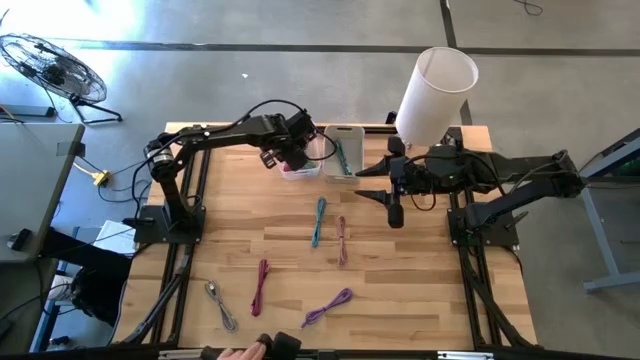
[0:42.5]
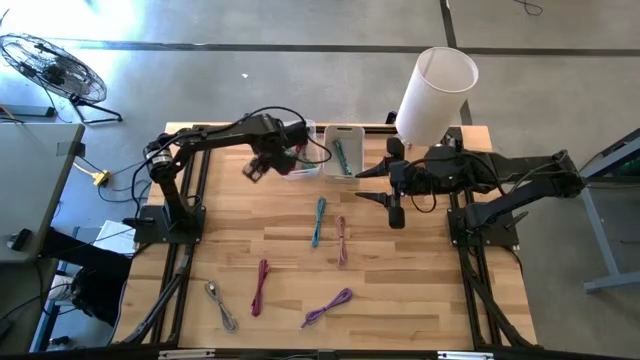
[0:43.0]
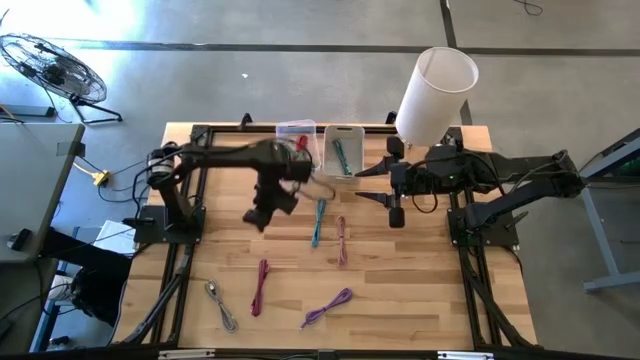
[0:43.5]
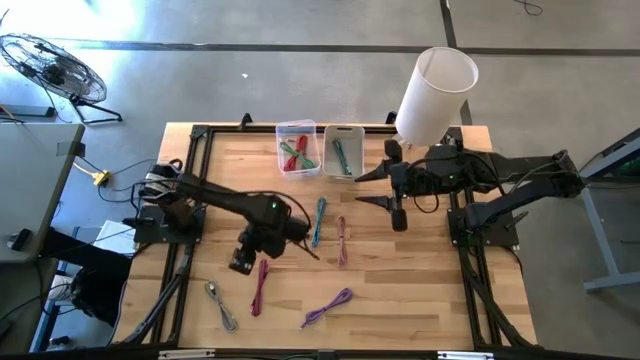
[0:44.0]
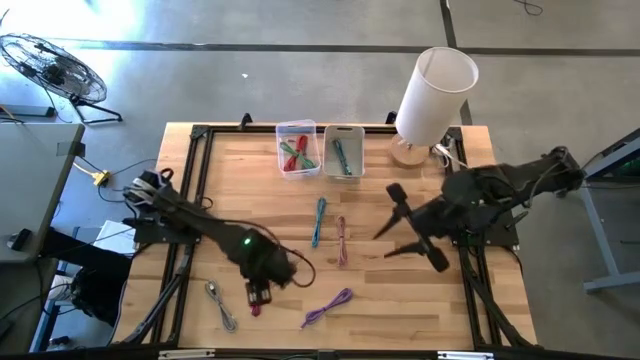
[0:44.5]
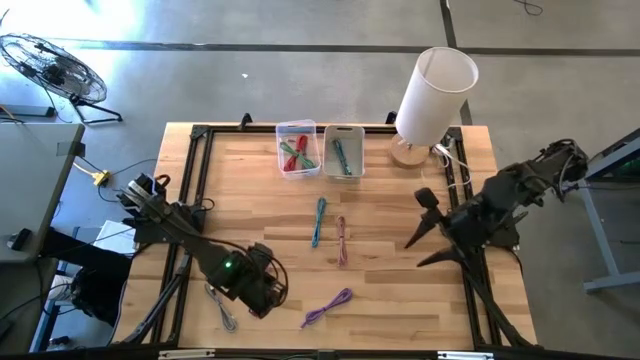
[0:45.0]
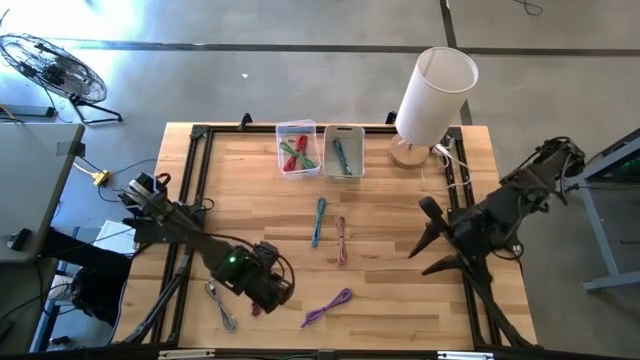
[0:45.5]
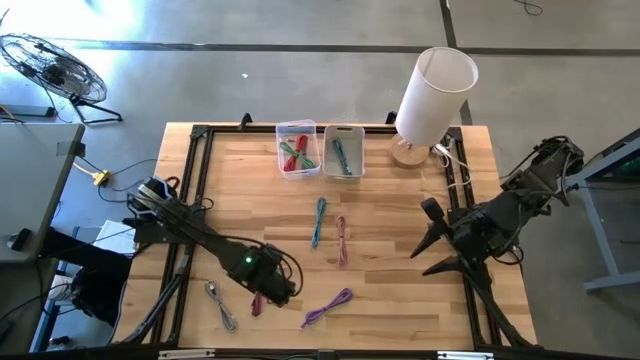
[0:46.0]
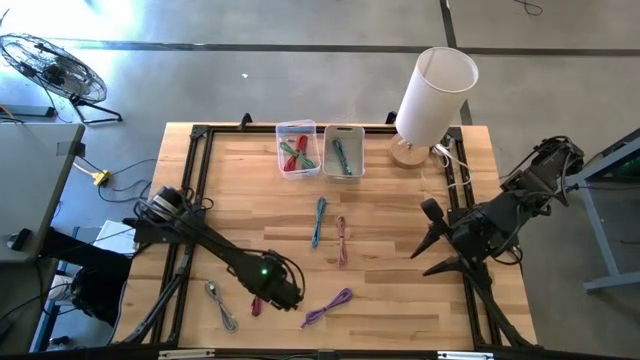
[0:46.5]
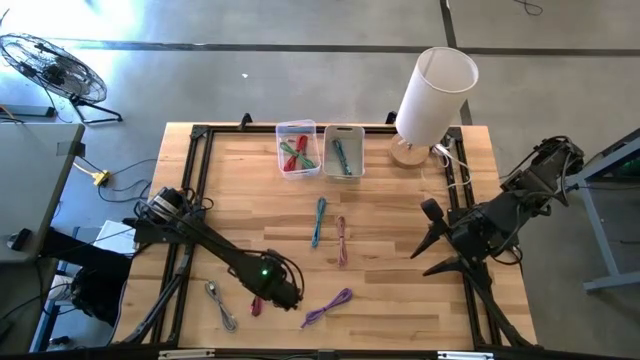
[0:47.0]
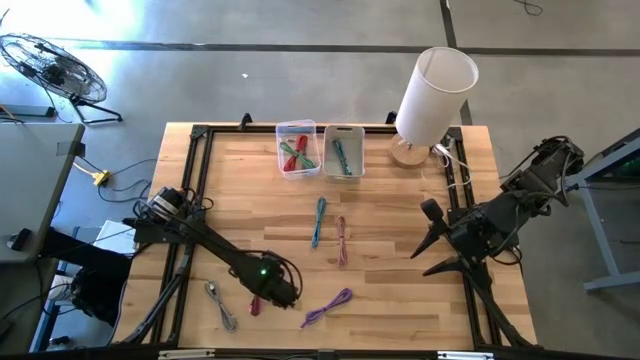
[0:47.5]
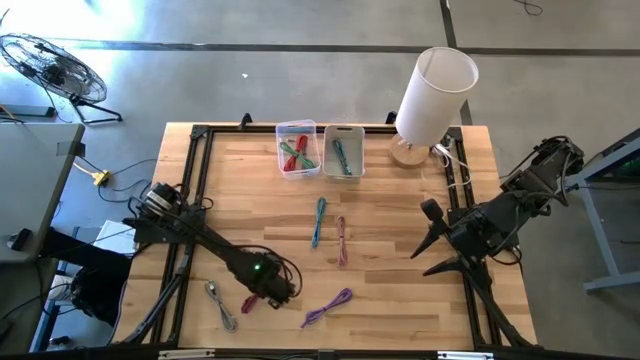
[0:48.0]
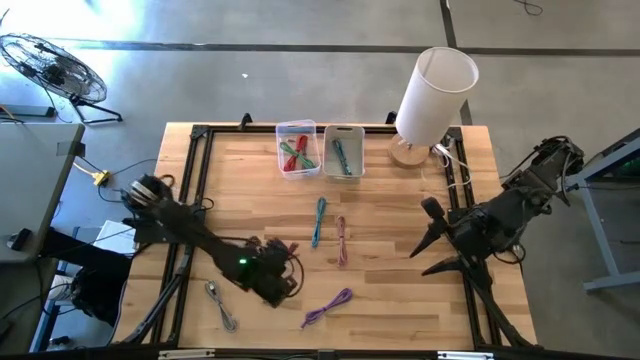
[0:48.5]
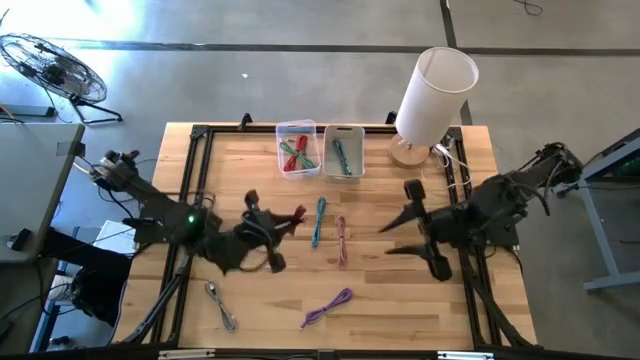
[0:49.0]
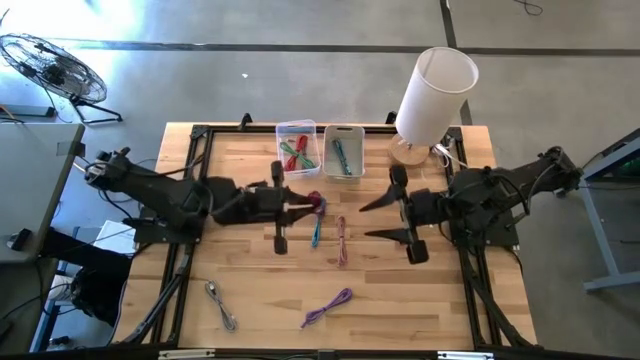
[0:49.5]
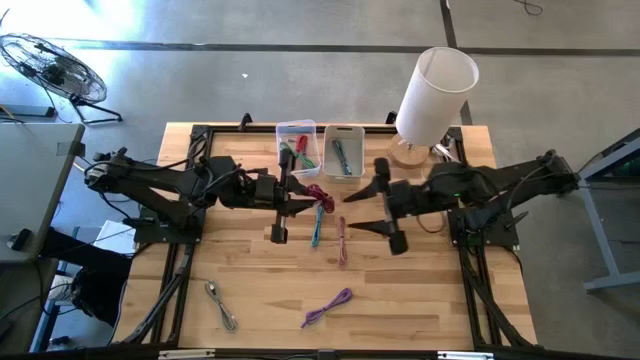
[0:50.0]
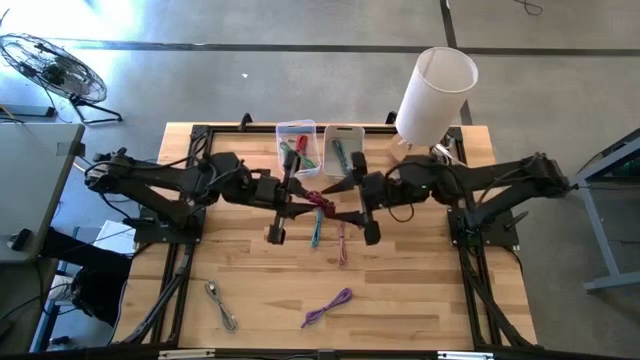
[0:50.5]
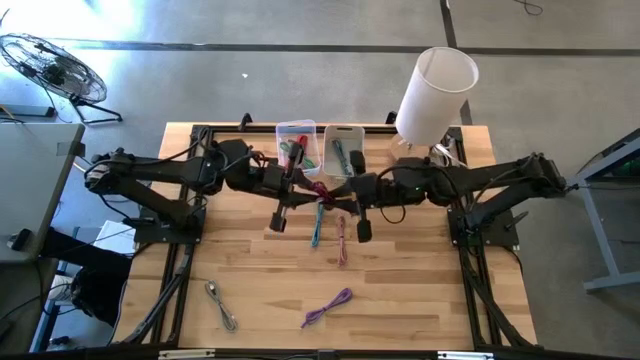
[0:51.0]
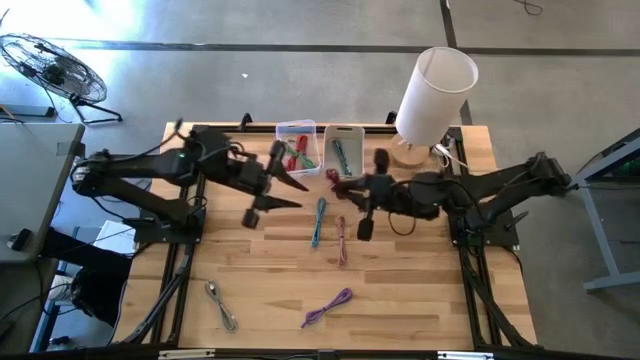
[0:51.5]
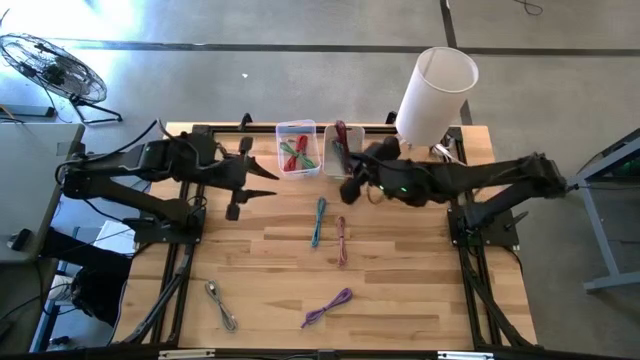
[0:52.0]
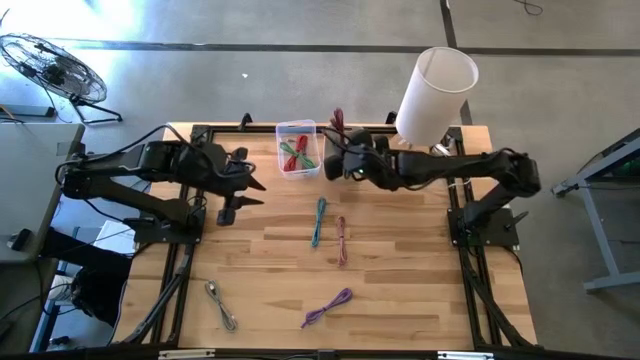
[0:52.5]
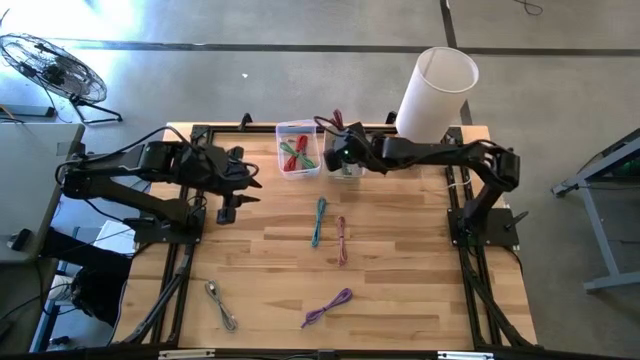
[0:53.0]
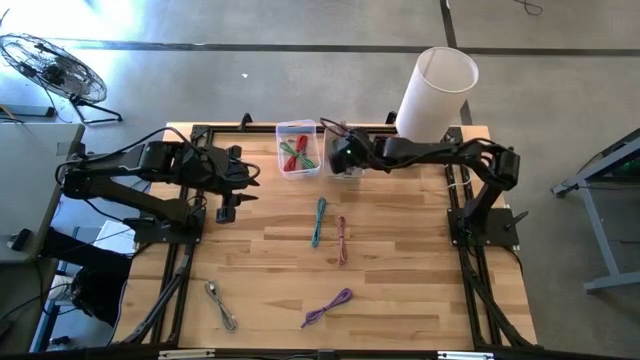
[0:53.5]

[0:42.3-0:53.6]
Task: Pick & Place USB Port
Put the pink cable into the gray bin

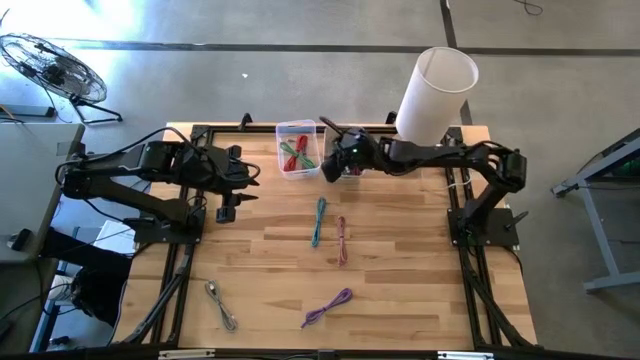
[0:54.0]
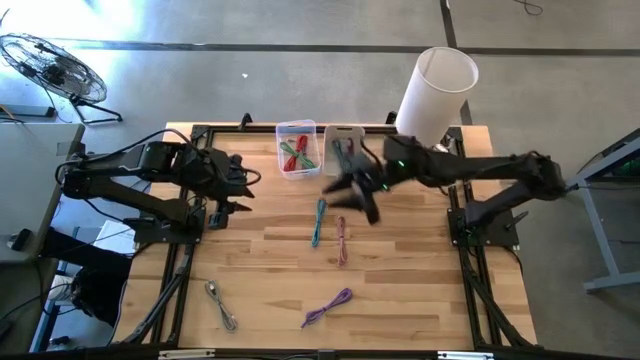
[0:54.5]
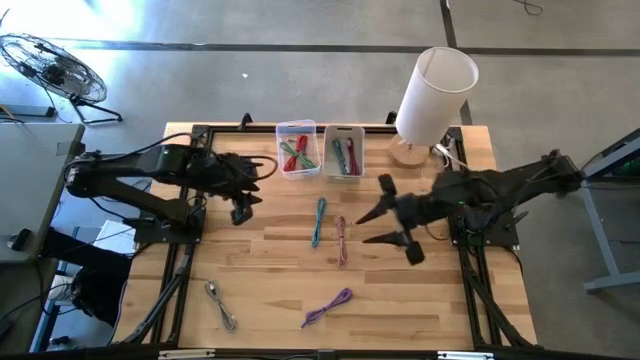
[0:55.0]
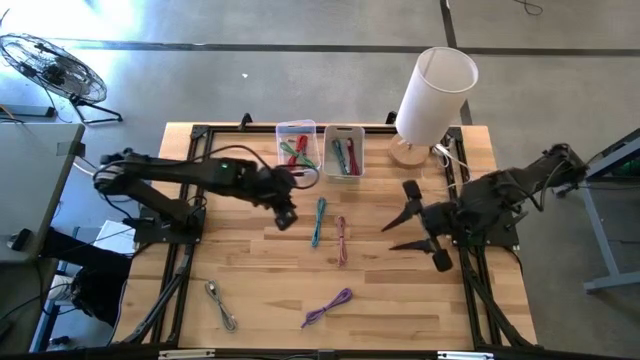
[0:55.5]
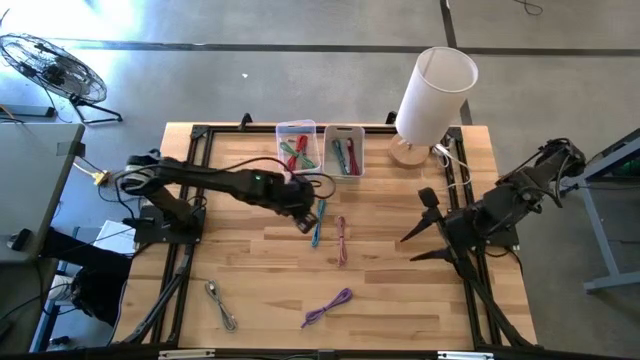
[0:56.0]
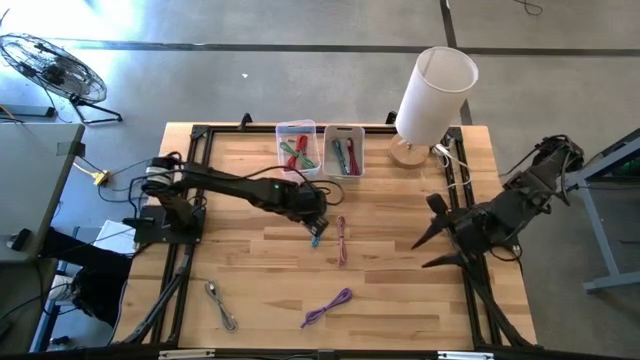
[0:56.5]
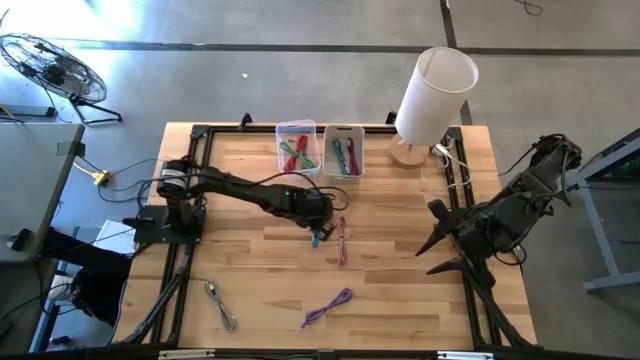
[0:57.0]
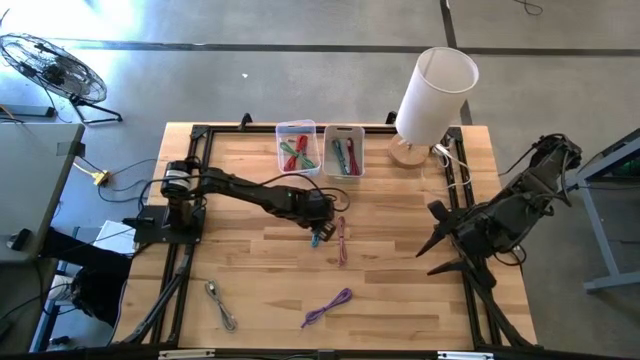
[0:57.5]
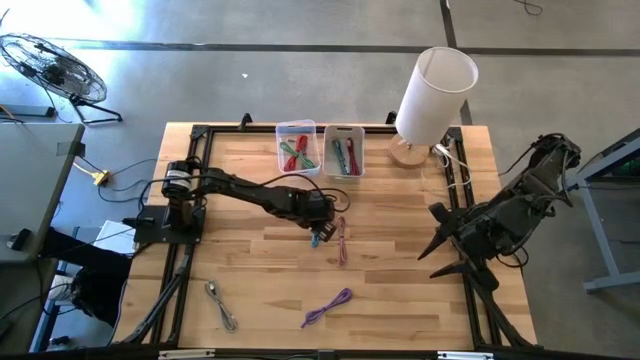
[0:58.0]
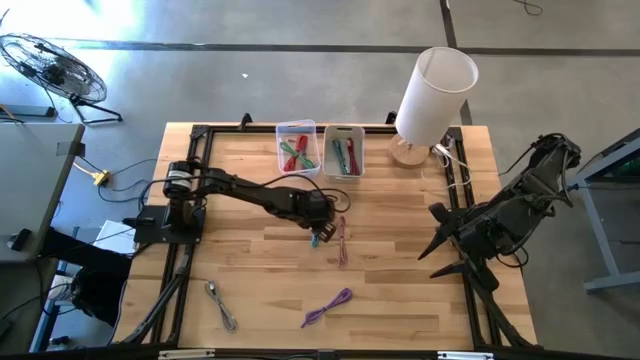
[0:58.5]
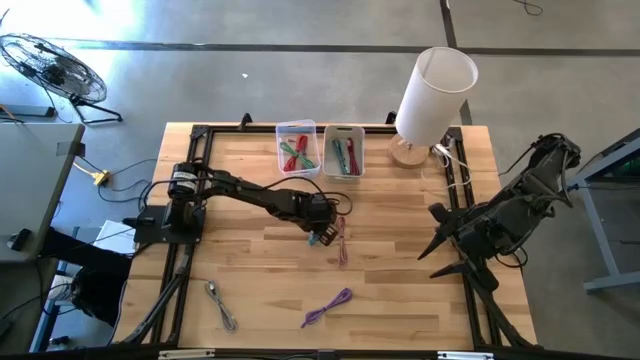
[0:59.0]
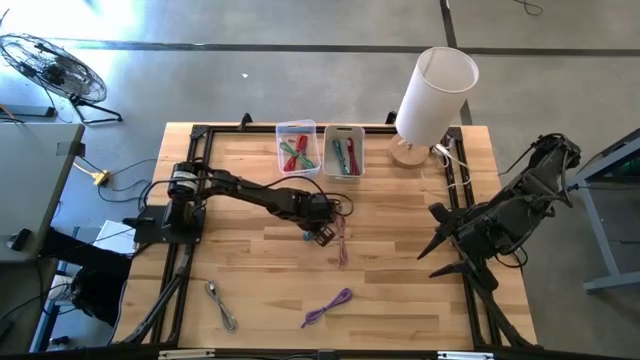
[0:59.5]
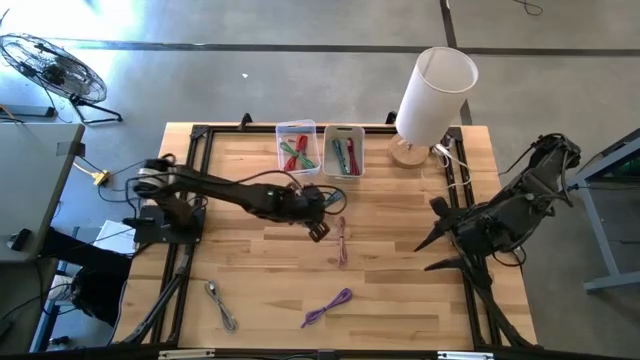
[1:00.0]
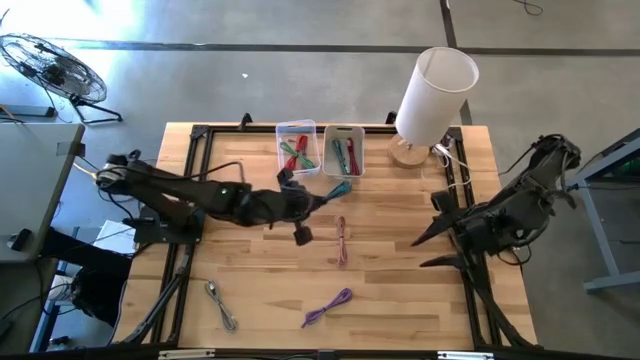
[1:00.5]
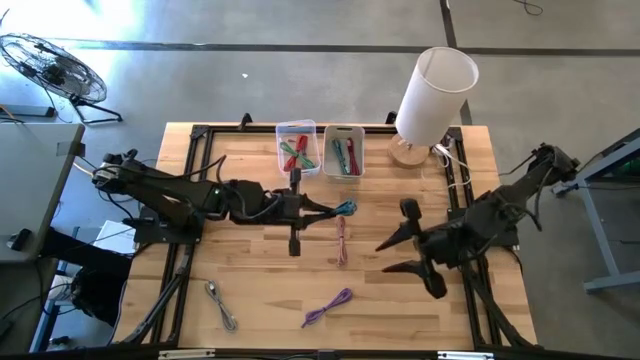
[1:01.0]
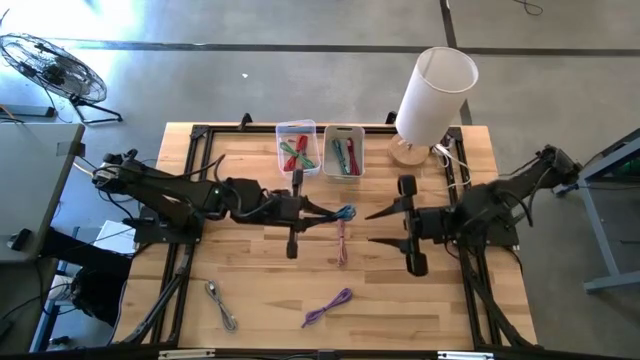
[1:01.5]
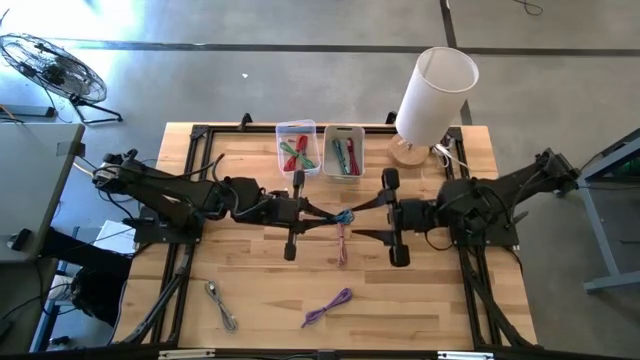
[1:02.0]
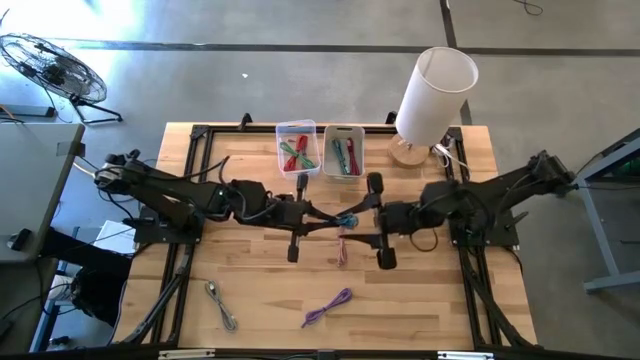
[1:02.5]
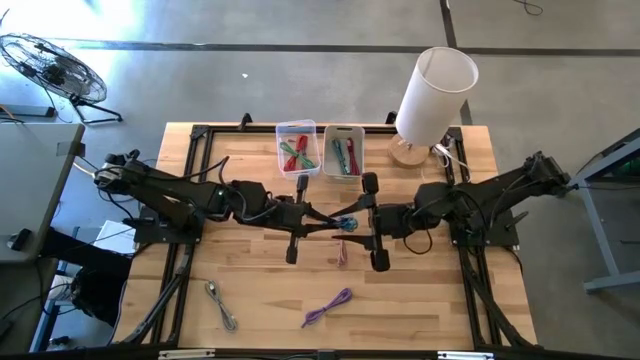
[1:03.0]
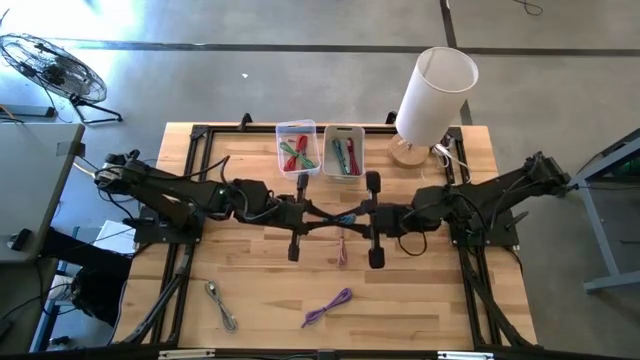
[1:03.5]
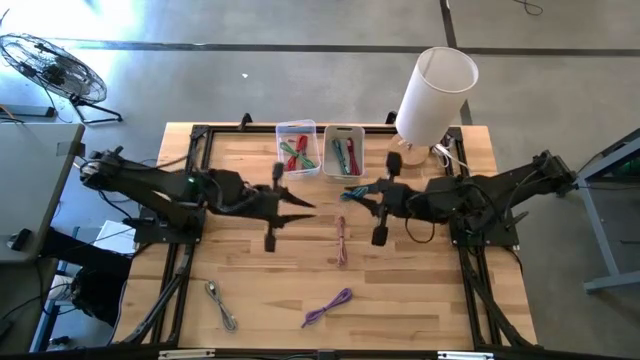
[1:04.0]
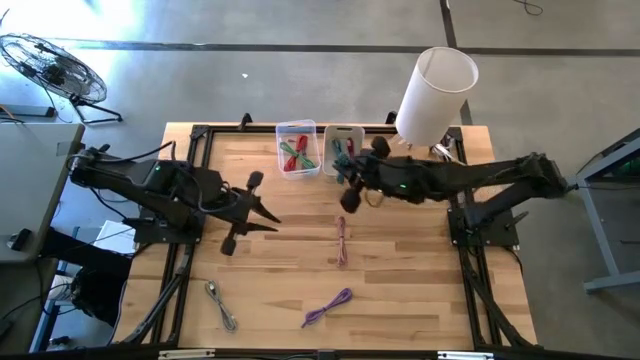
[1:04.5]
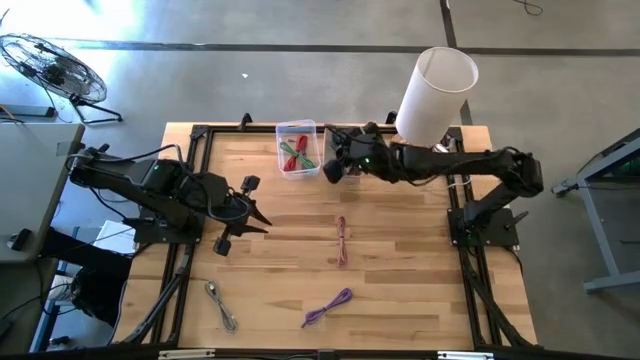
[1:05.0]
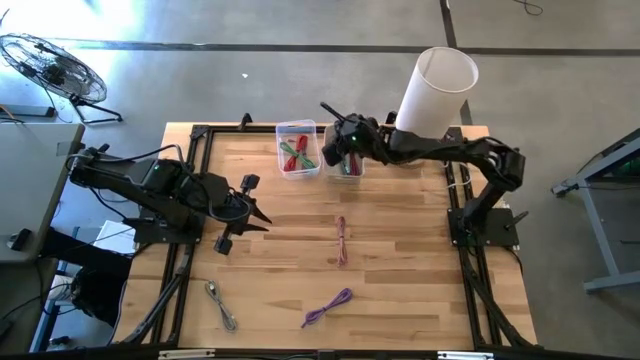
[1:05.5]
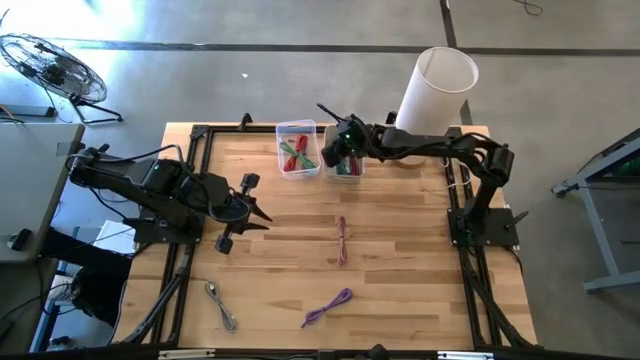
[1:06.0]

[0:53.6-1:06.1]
Put the blue cable into the gray bin
